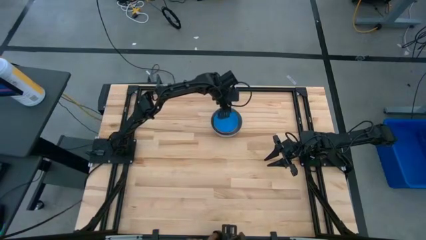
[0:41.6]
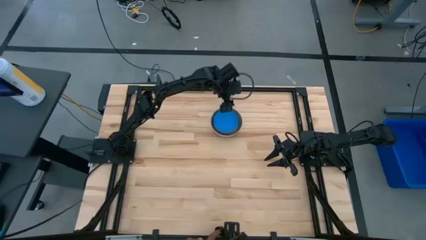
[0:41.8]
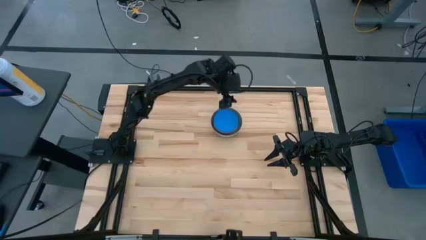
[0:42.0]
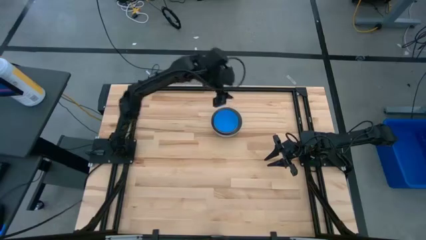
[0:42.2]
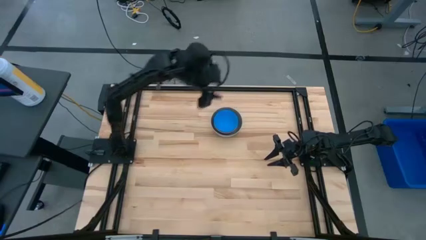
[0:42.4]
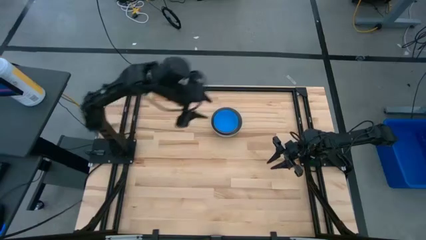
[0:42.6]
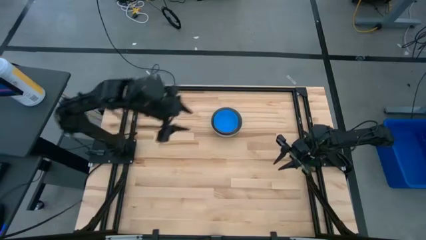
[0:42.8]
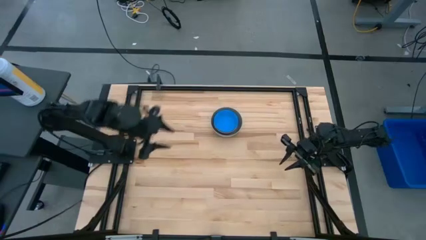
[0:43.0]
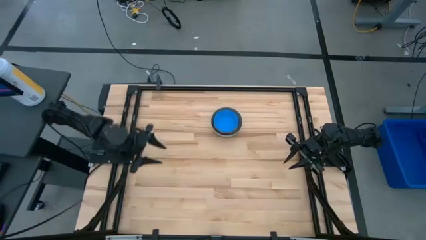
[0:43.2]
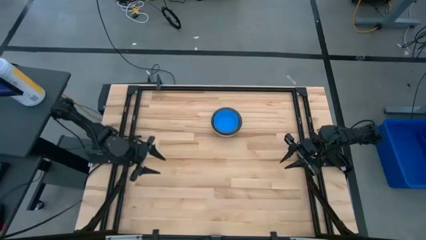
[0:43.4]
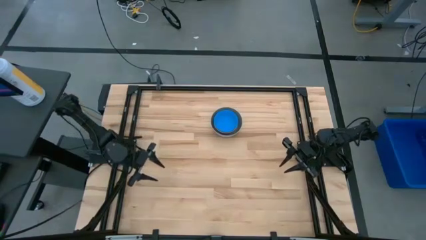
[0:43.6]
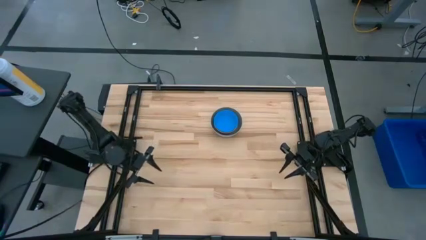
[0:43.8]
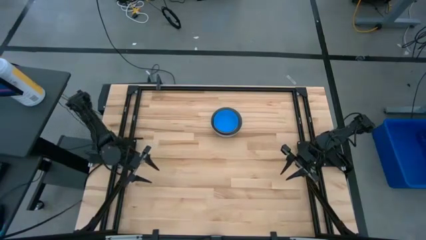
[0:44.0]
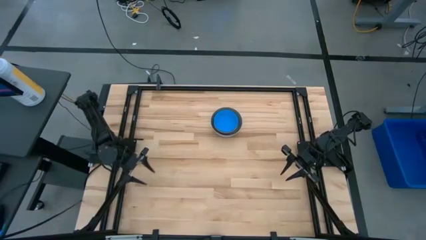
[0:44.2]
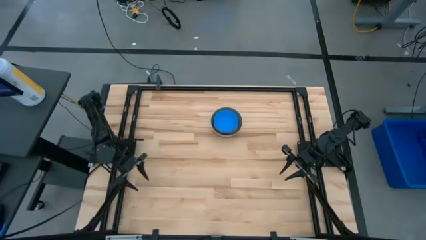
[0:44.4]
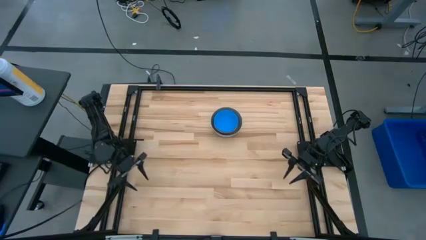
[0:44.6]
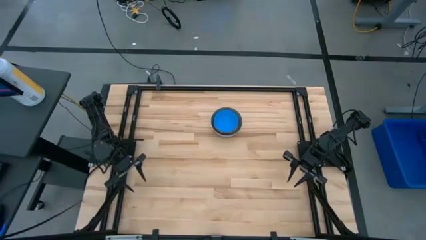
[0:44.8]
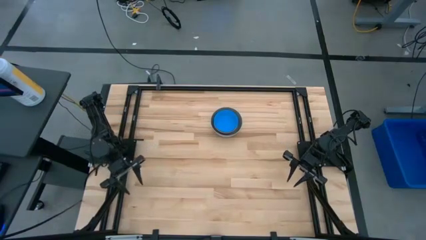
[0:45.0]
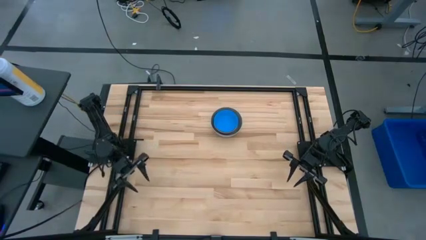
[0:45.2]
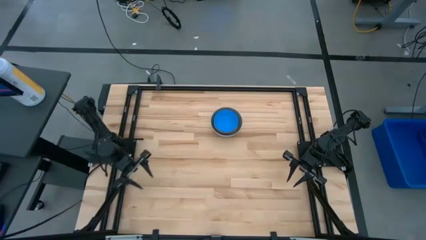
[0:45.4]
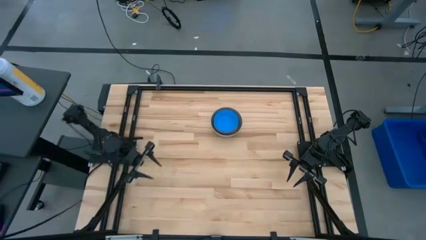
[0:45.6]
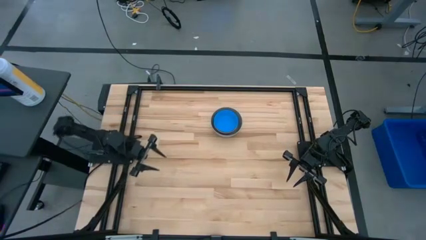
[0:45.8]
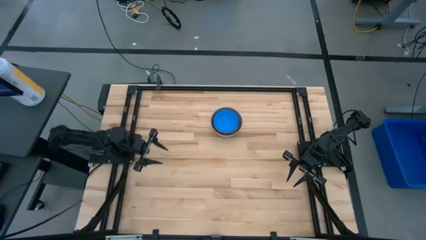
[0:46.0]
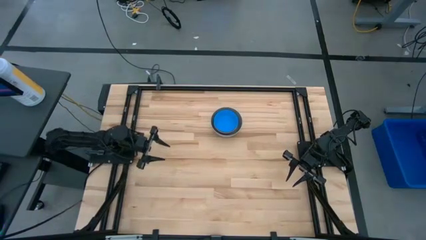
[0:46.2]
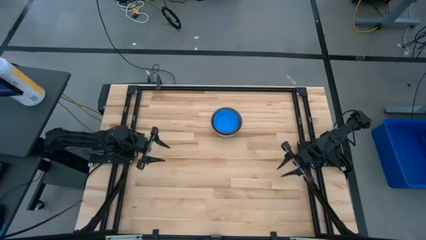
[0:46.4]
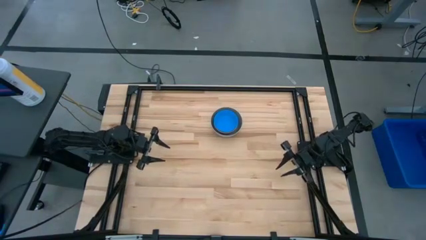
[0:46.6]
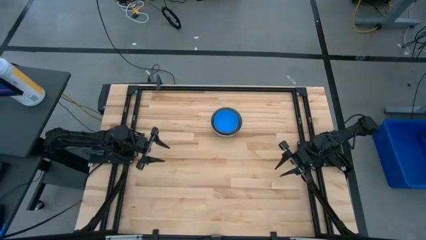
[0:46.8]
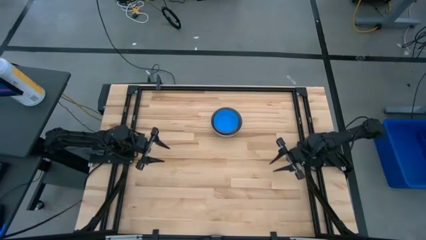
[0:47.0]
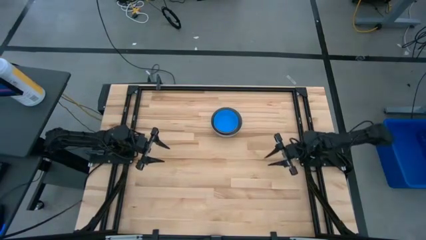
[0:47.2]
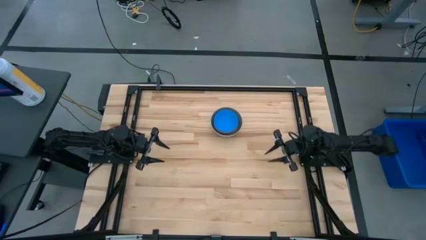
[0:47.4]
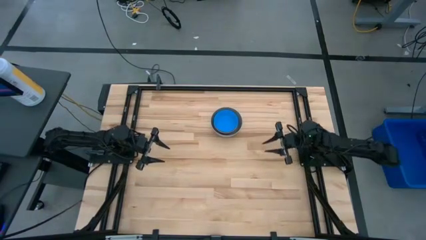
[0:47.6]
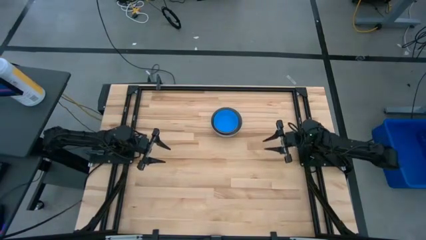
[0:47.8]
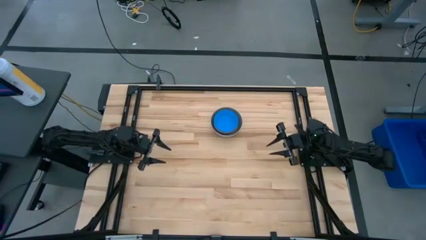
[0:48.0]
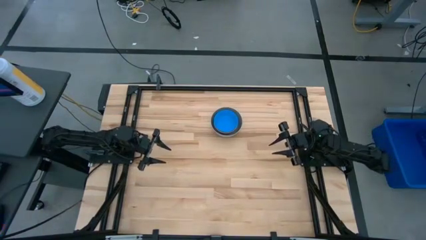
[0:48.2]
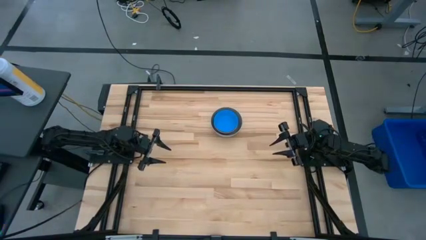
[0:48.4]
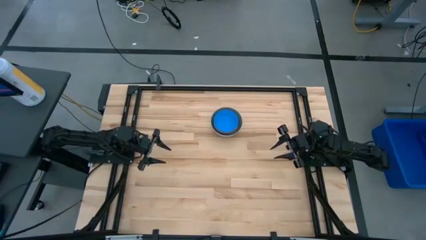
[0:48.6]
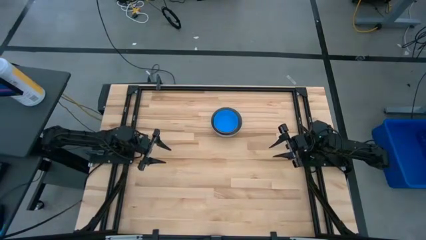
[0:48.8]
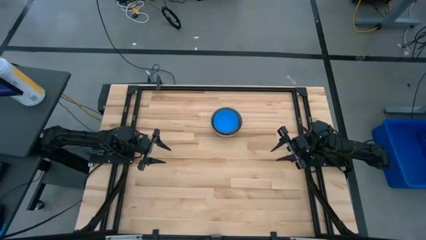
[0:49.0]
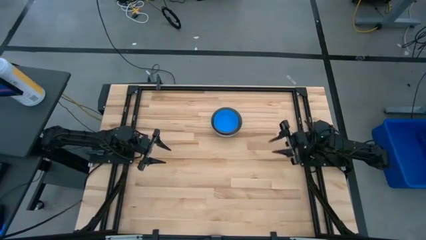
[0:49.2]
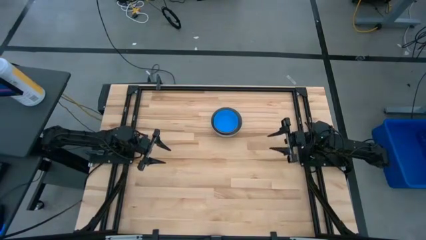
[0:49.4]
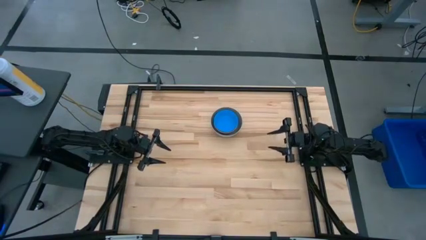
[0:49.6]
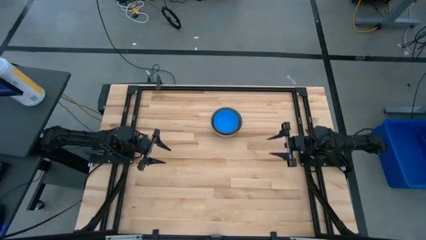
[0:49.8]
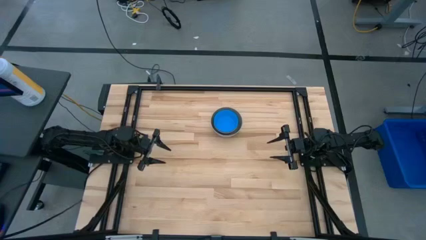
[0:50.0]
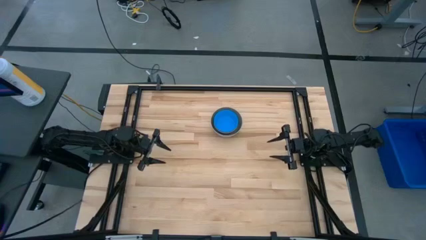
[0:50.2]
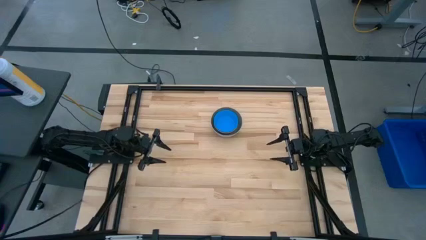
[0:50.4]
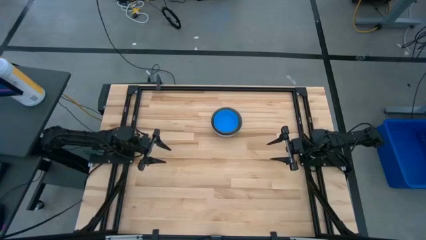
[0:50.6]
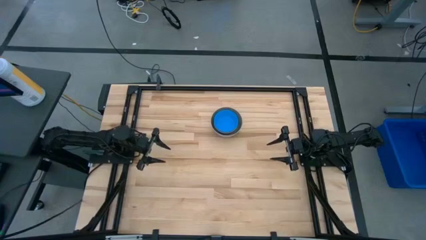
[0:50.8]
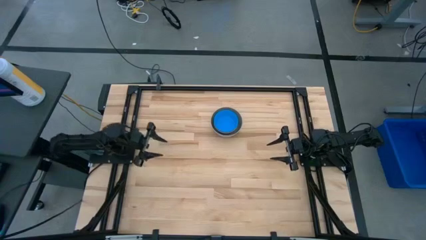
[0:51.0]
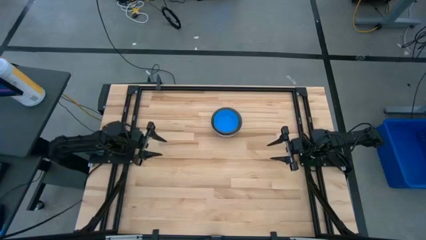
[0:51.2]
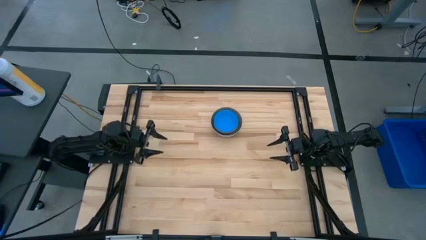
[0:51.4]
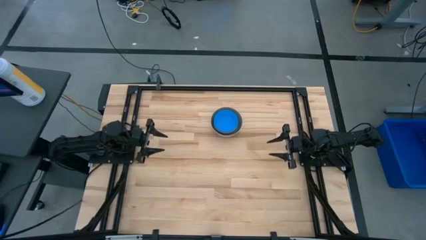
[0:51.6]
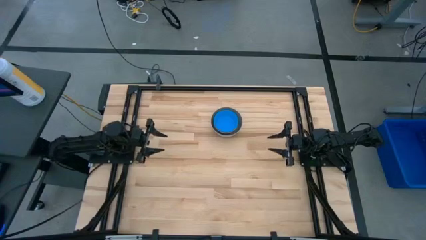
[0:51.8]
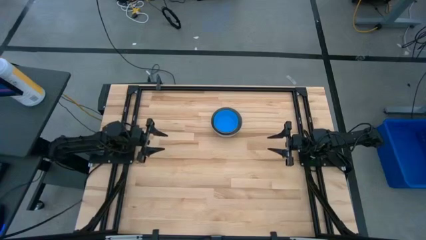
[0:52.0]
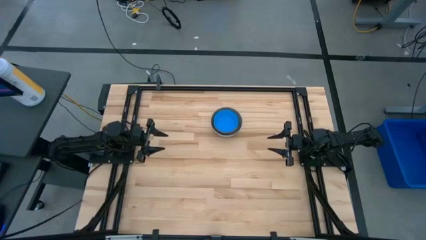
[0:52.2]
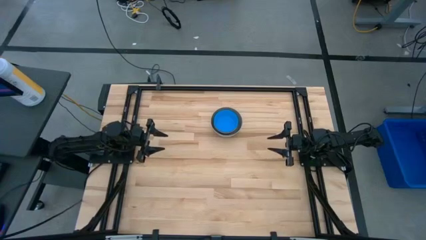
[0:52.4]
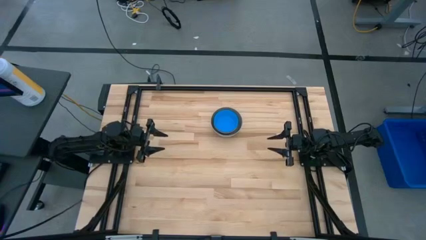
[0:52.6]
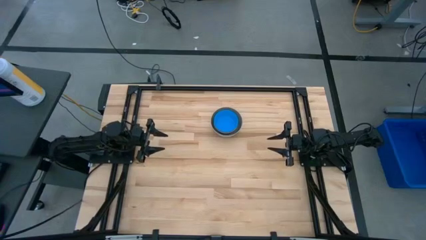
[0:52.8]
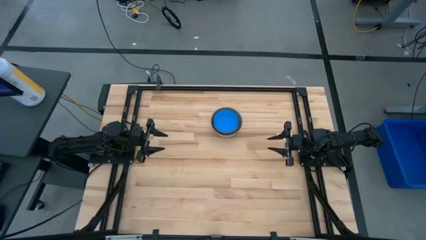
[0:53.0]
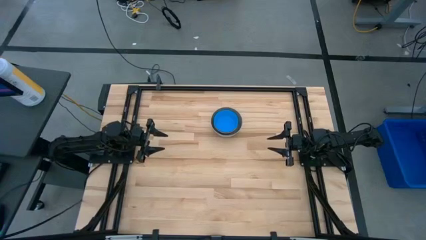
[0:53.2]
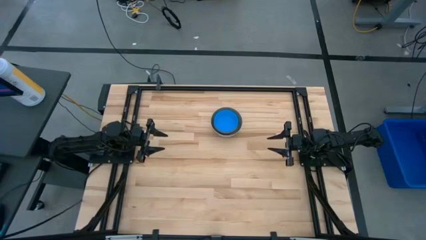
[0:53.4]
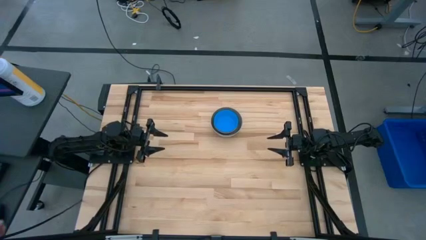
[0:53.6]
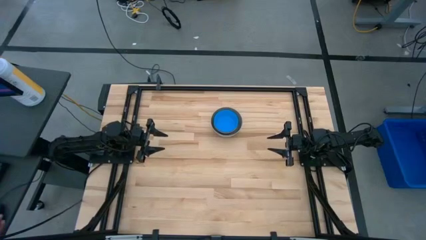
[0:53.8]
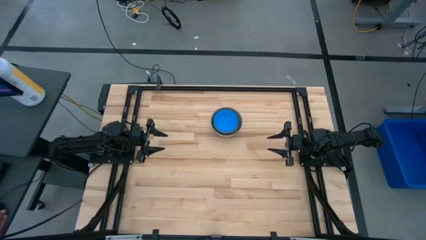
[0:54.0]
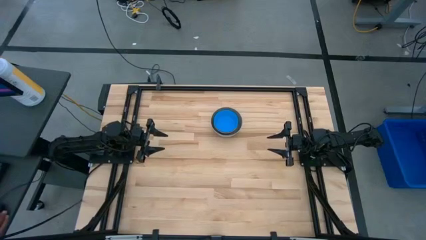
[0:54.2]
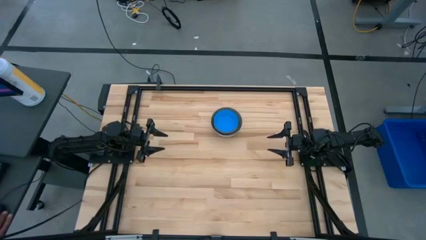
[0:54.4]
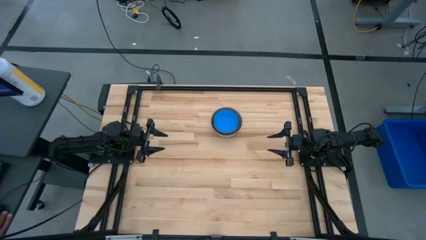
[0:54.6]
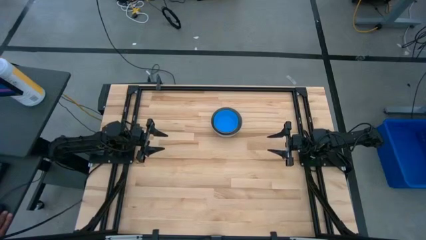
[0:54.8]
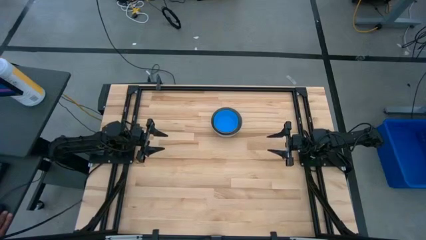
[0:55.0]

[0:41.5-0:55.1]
Return to Home Position
